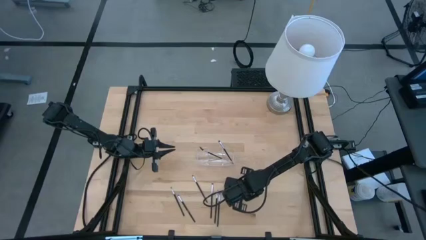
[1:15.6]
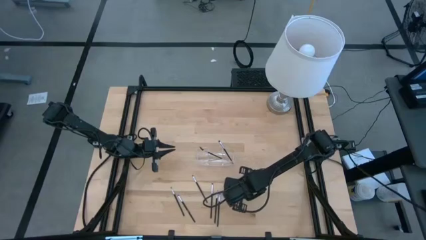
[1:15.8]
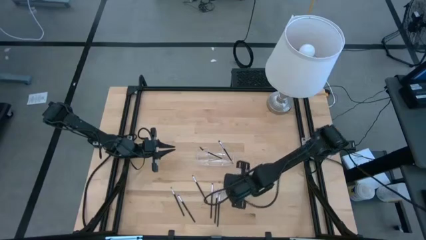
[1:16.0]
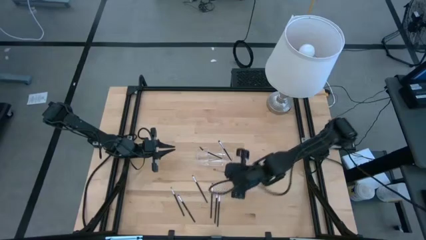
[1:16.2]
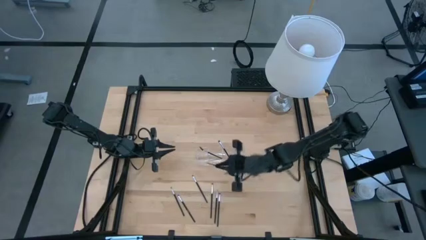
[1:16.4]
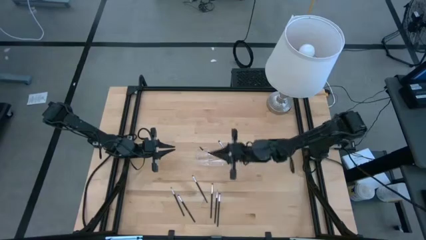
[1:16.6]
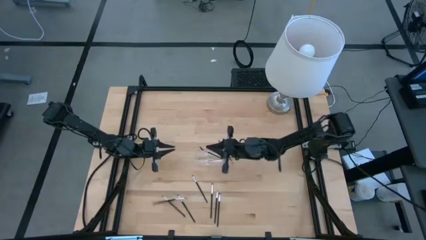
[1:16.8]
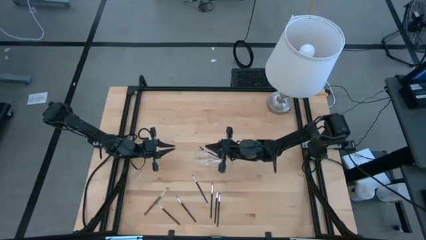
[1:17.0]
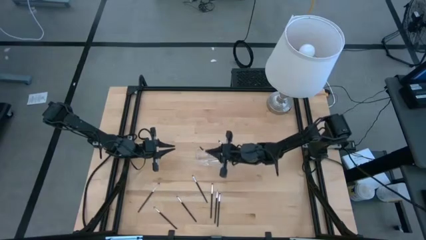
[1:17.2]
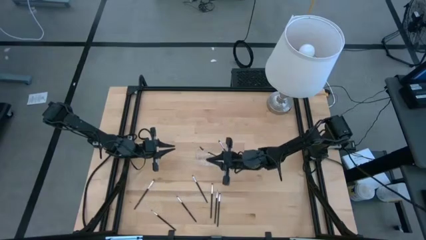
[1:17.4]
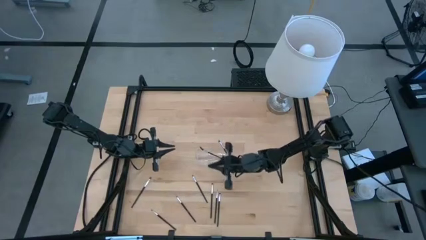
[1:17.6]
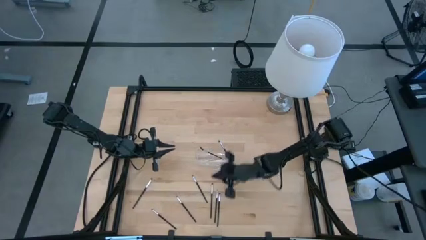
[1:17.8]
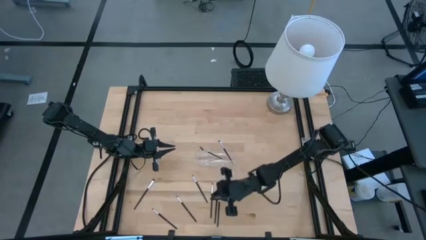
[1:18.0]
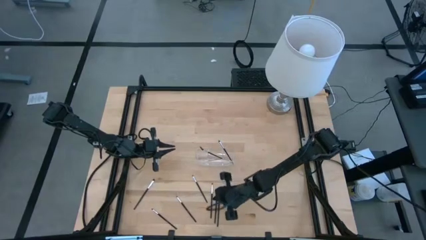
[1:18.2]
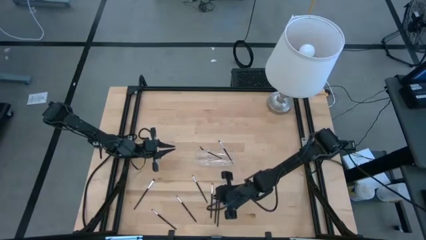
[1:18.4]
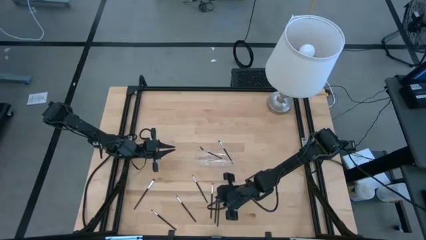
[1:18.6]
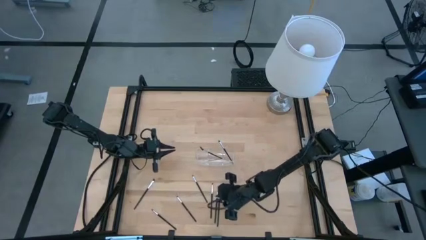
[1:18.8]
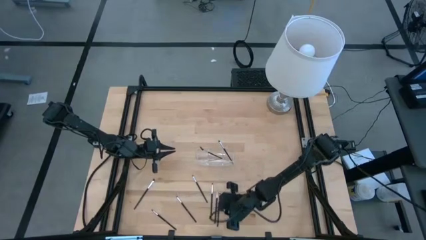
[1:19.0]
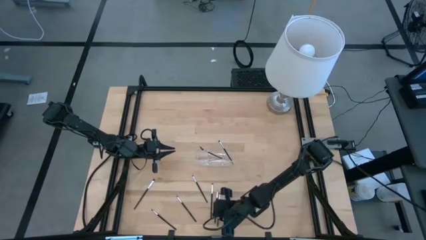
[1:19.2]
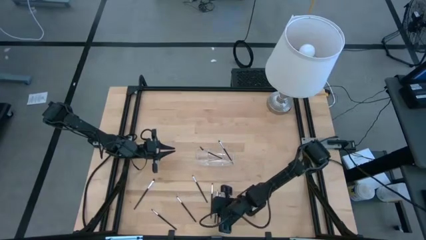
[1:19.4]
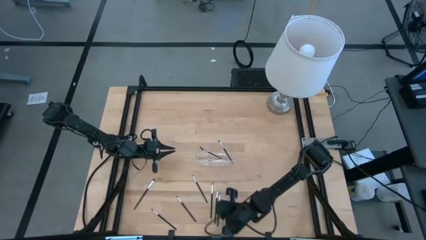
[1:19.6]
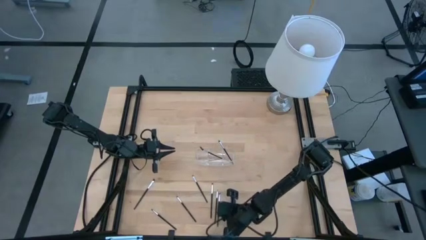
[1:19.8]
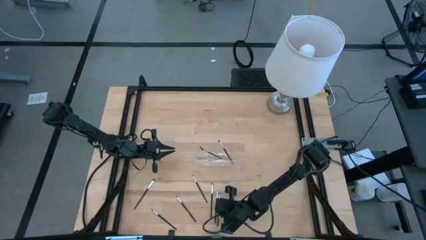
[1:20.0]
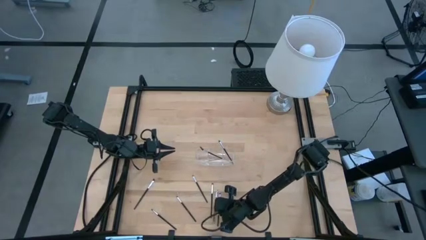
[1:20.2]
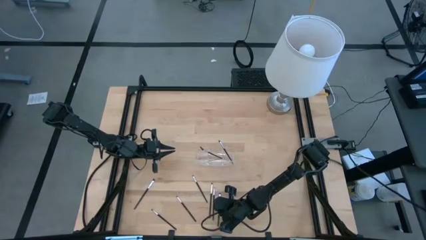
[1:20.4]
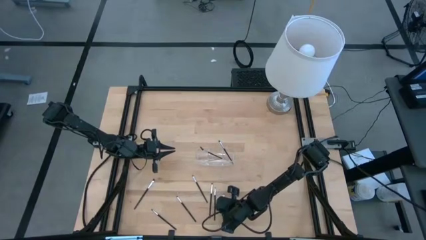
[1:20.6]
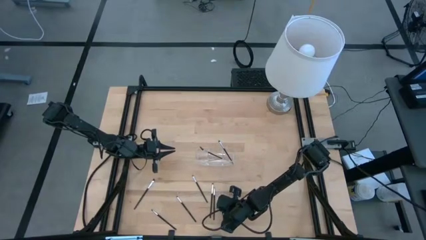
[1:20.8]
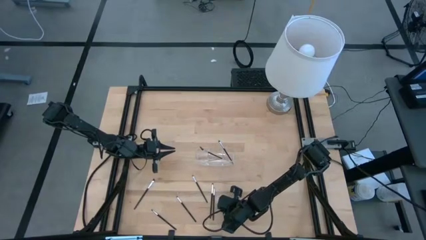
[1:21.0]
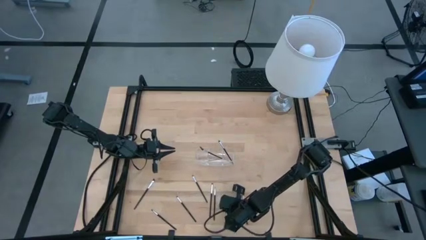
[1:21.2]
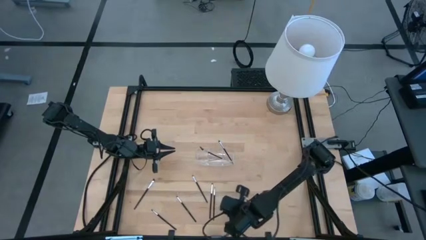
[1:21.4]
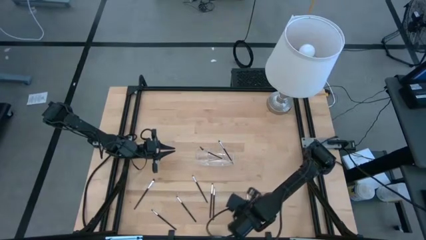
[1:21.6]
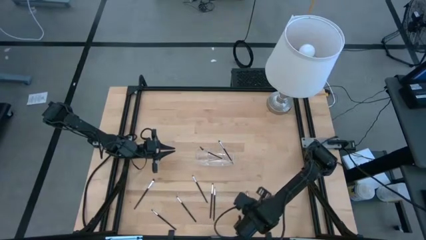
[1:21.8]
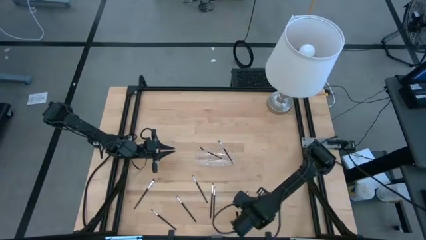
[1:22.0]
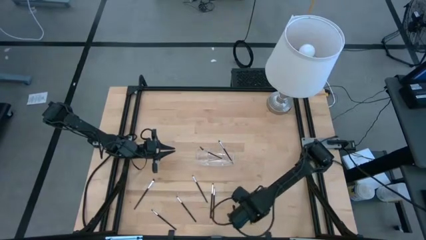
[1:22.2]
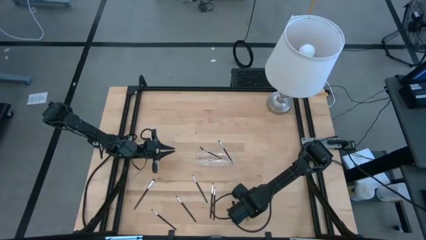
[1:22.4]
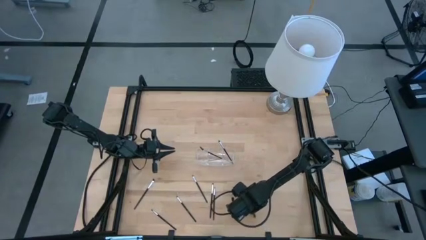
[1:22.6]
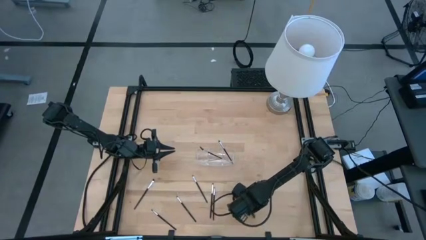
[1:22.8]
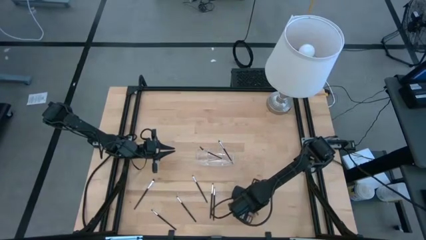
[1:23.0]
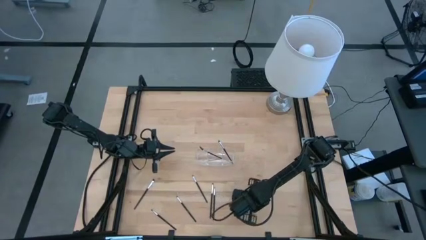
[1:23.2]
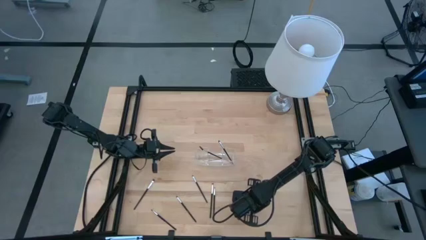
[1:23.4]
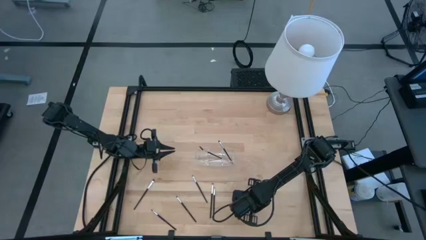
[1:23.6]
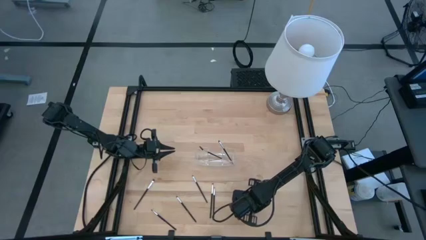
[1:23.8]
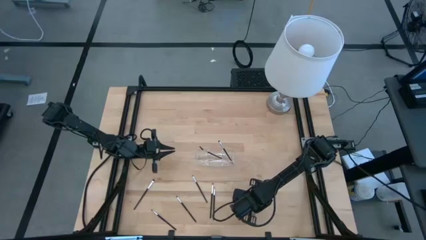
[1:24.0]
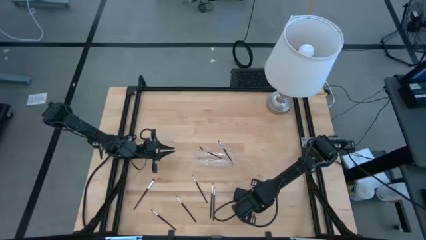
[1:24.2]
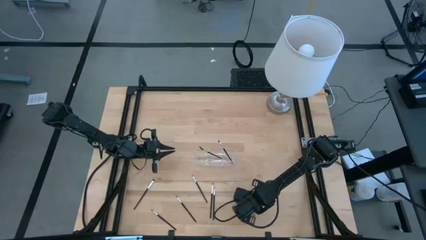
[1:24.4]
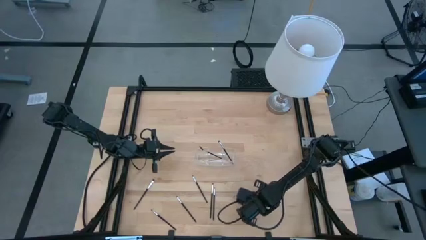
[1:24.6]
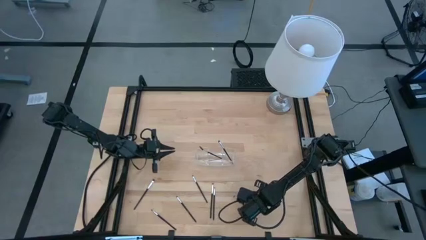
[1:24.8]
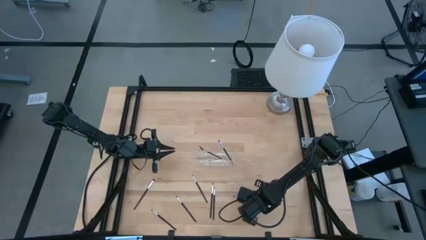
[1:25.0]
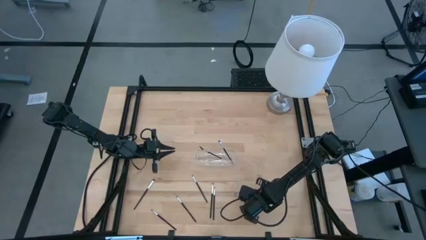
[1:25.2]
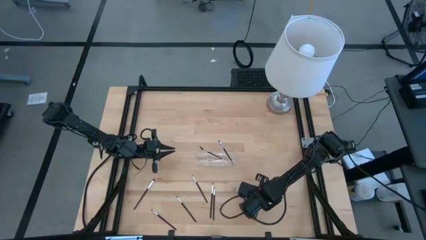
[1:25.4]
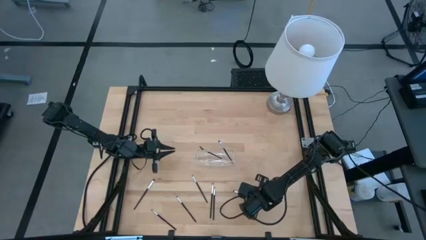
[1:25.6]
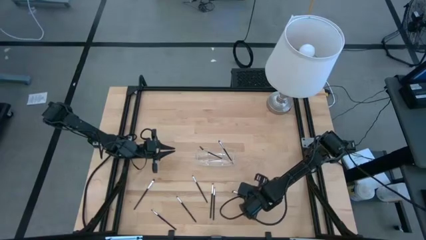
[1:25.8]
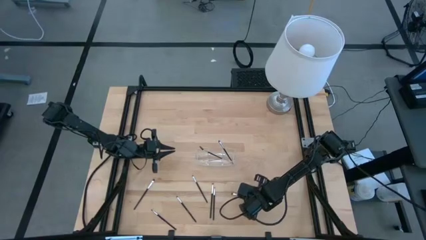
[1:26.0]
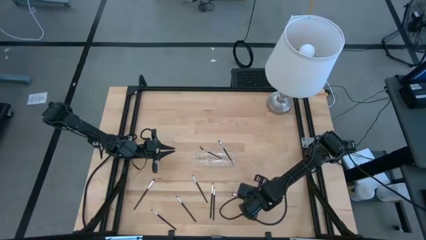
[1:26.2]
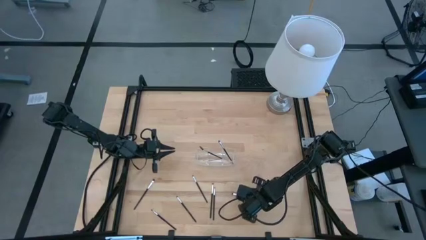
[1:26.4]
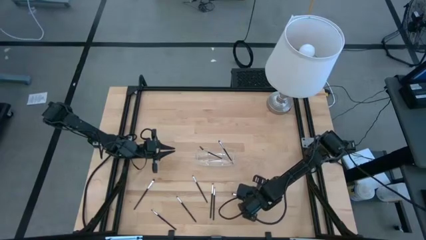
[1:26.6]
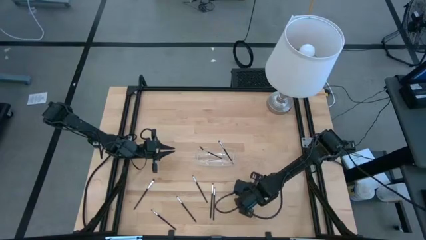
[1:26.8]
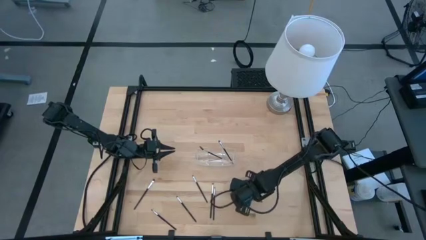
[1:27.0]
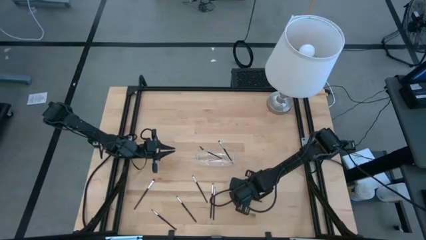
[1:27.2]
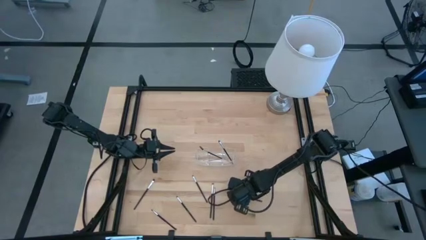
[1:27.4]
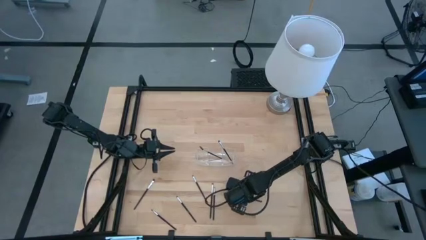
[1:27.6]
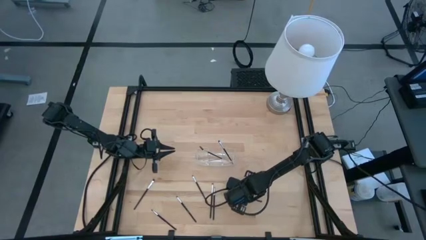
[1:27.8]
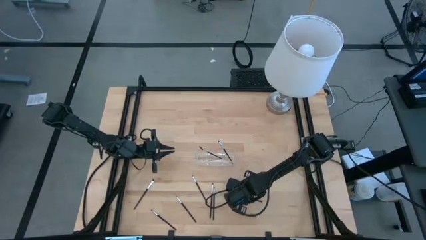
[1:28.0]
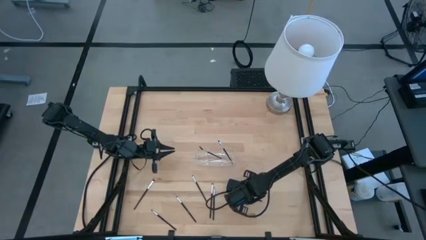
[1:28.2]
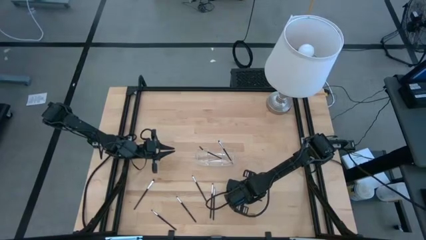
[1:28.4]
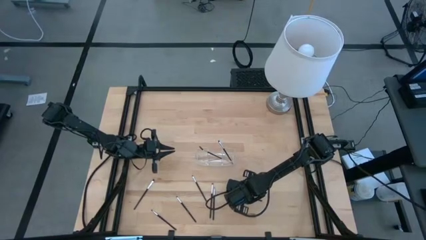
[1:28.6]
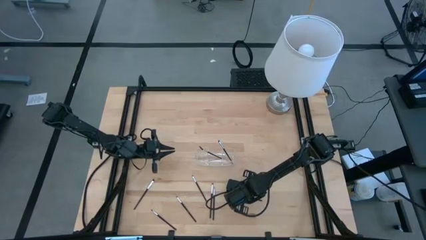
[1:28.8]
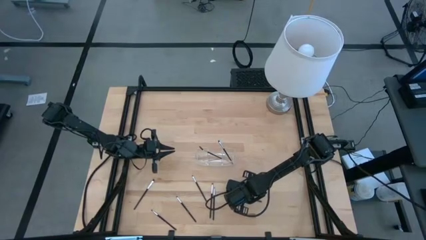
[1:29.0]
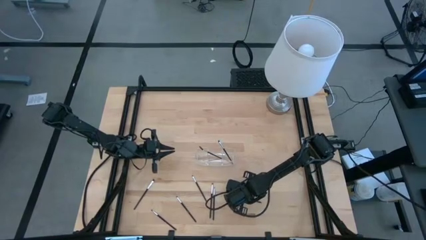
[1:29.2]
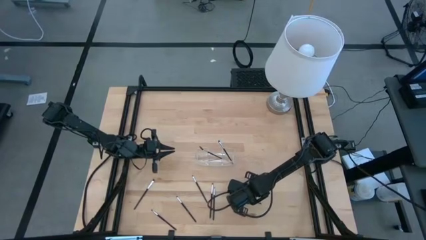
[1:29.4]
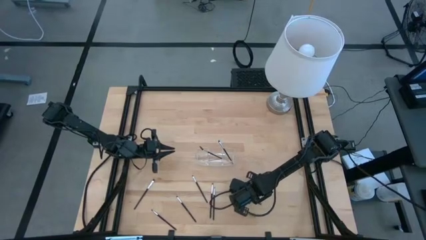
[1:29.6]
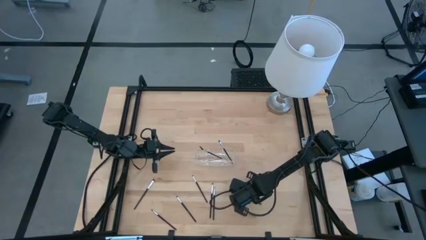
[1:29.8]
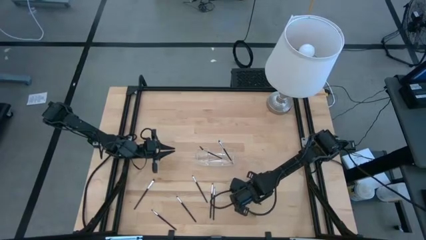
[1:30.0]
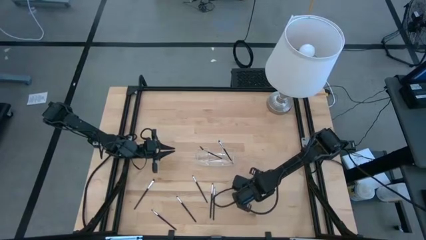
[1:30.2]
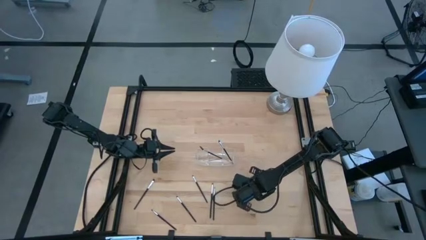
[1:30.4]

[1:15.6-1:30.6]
Task: Pick & Place Makeup Supplies
Put the makeup brush into the transparent organizer

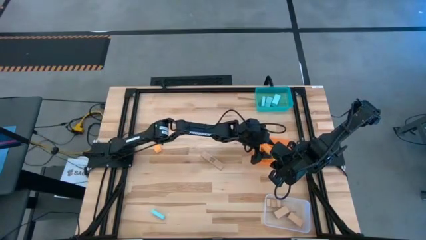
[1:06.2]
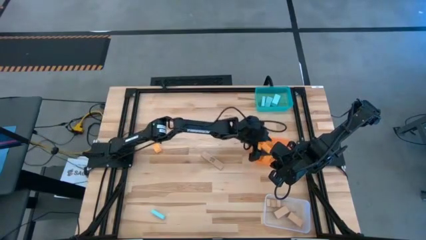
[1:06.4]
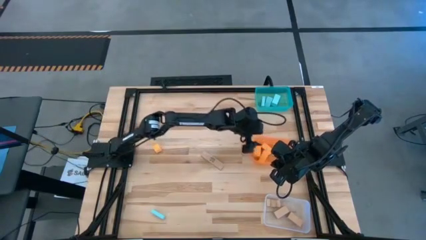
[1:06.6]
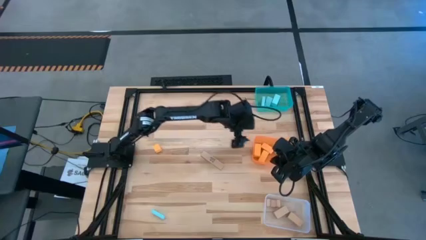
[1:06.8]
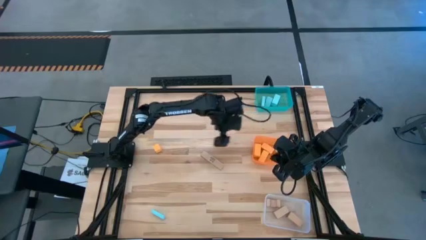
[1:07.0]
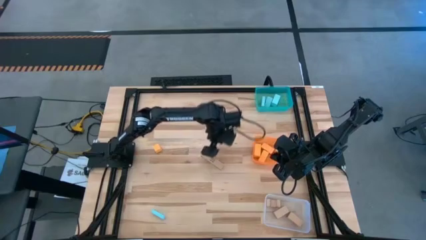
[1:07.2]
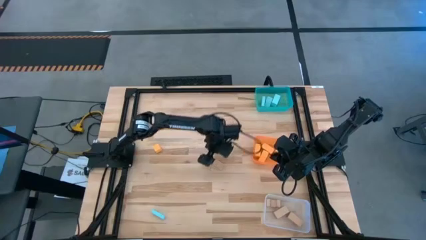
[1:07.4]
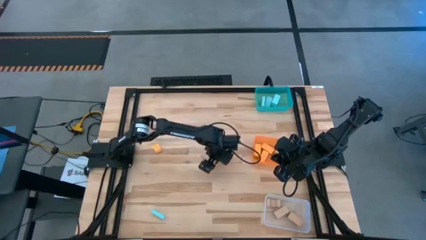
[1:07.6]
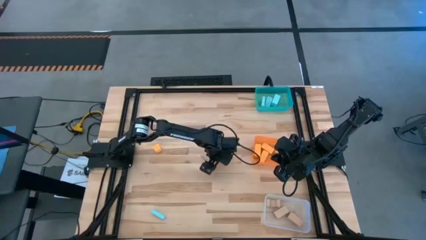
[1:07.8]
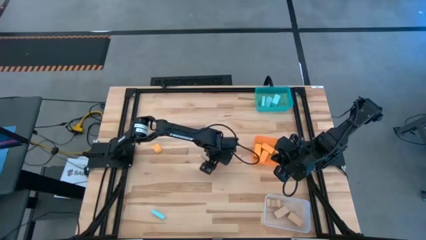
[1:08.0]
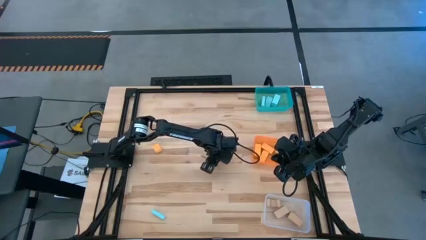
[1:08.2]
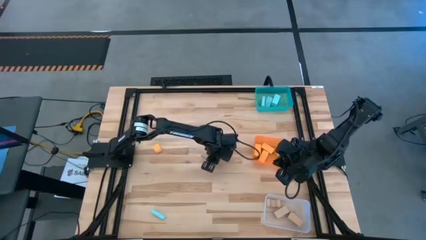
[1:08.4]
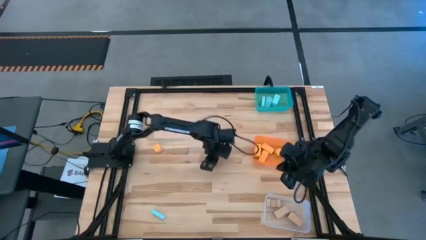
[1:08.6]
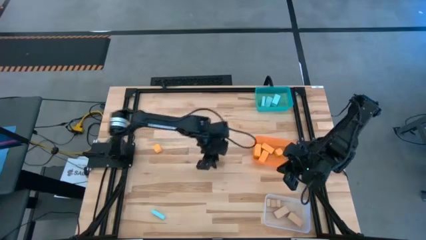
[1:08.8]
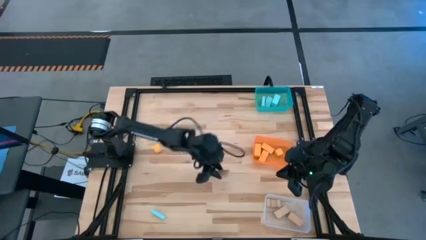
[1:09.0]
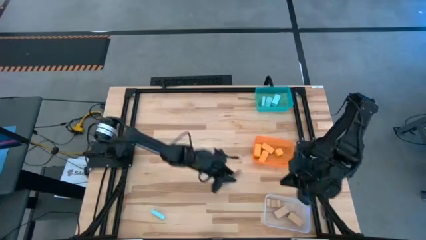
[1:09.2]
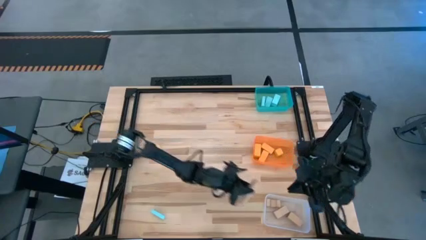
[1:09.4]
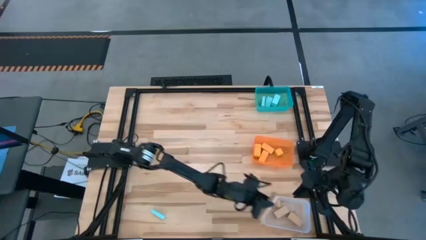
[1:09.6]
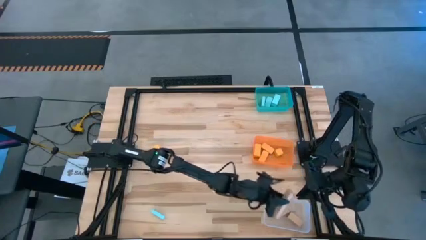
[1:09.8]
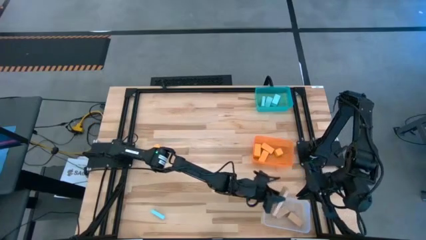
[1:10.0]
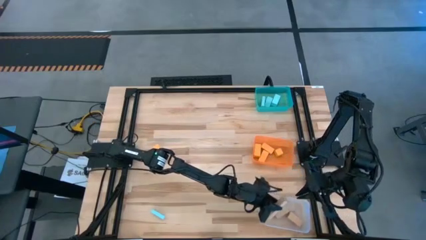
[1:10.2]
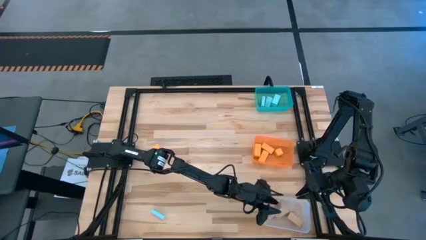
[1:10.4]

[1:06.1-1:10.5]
Task: Sort & place blocks by color
Put the brown block into the transparent bin
